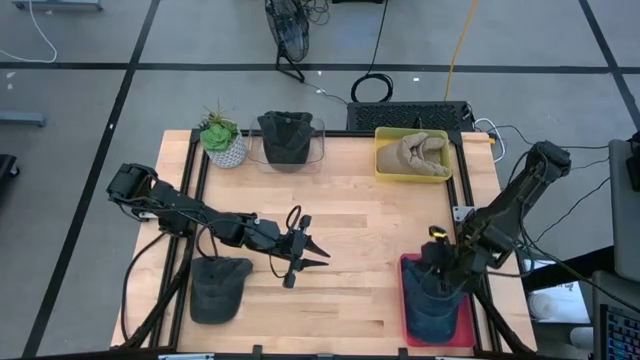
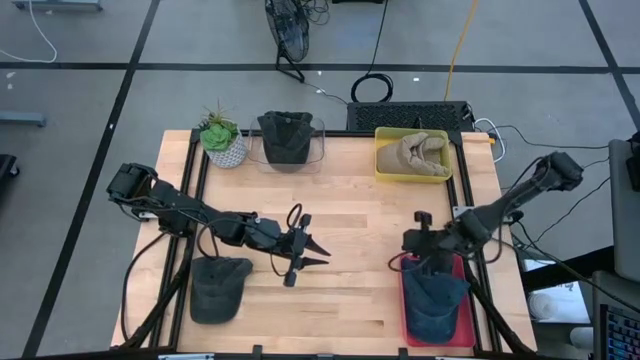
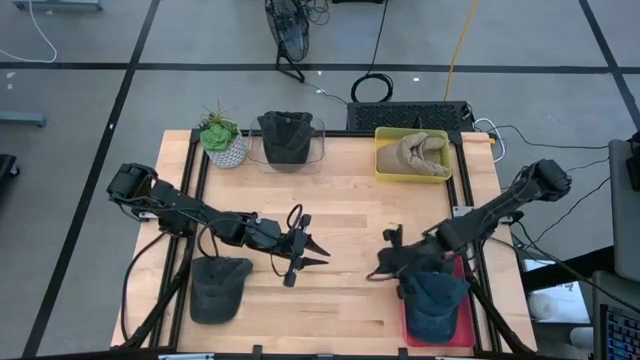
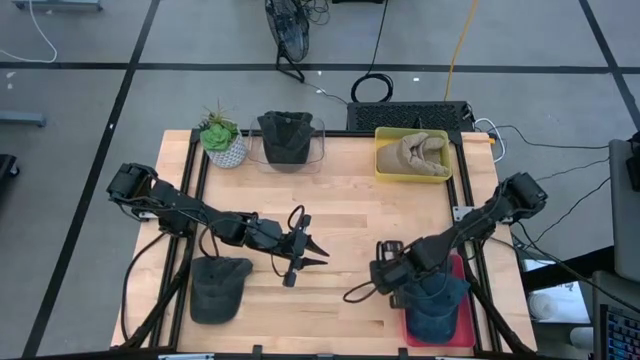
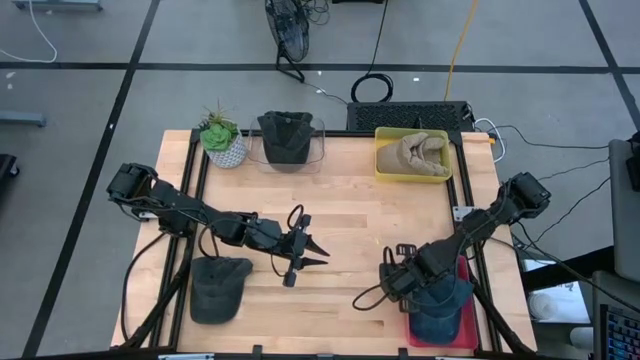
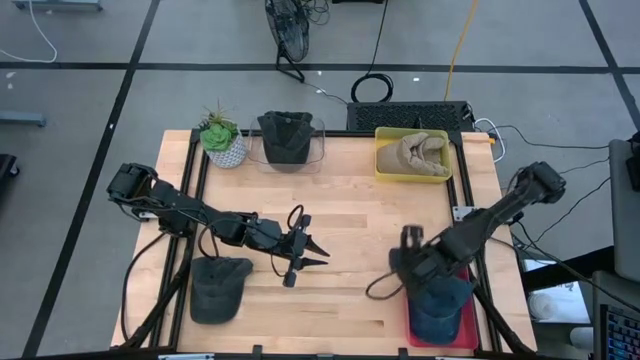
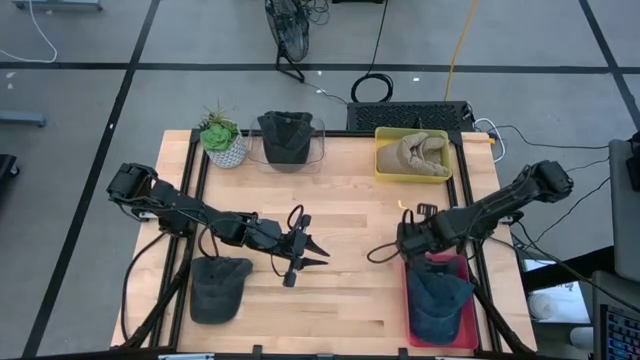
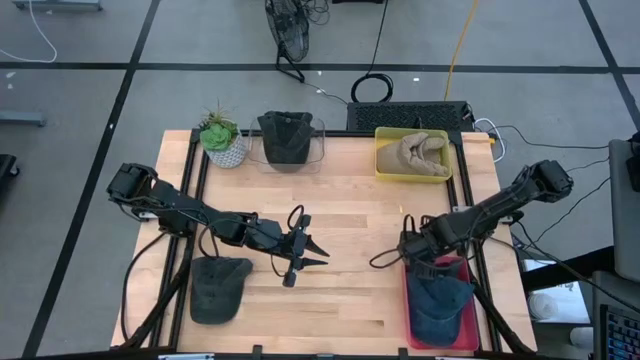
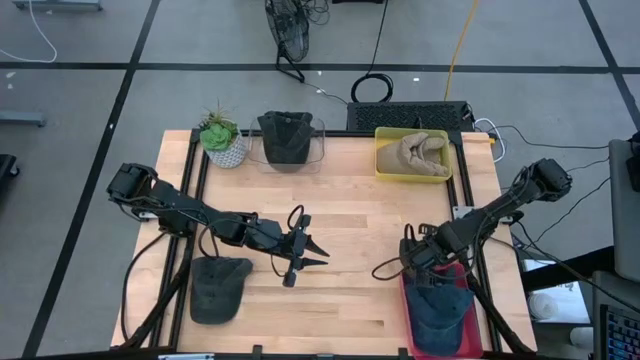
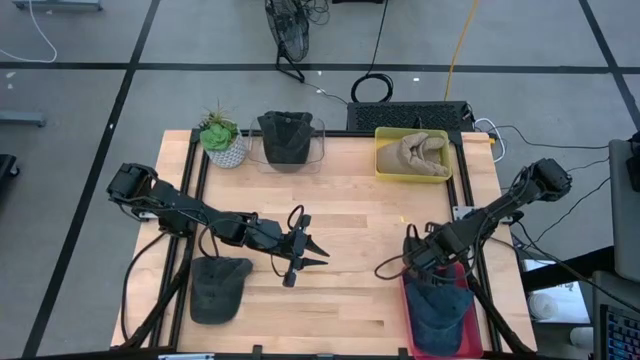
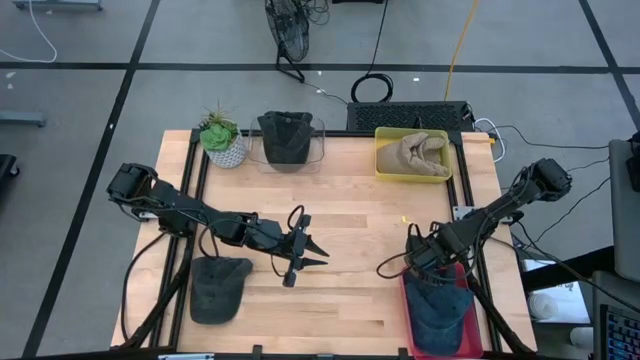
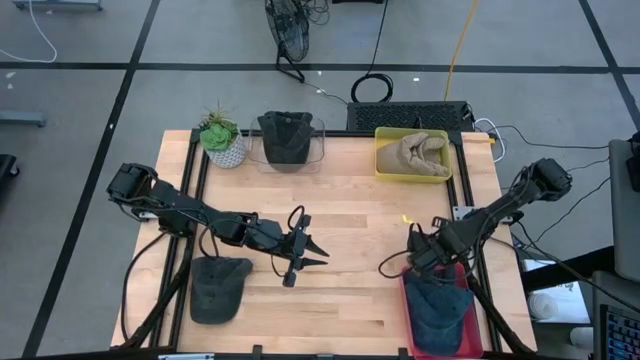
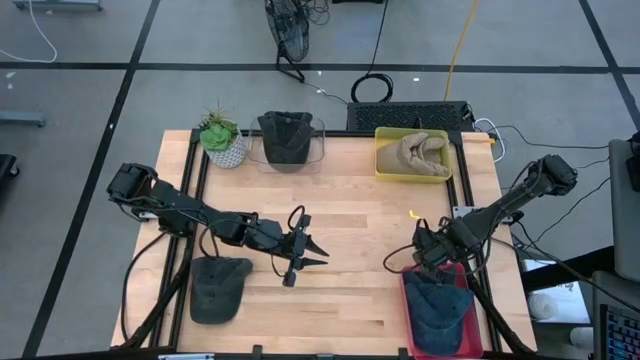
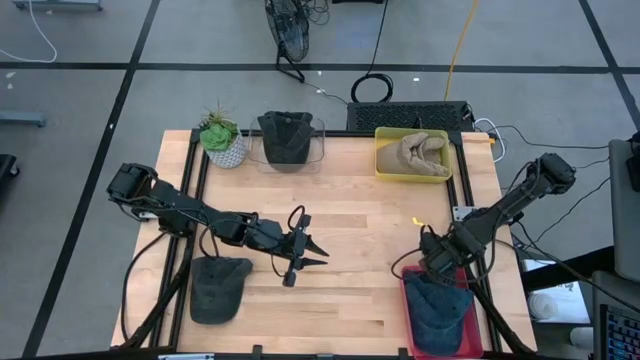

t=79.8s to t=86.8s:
Task: Pick & Place hat
Adjust the pink bin

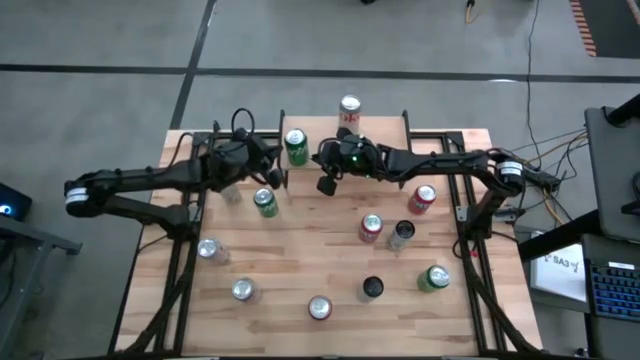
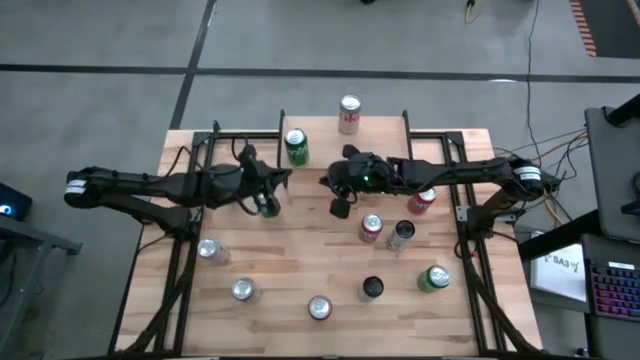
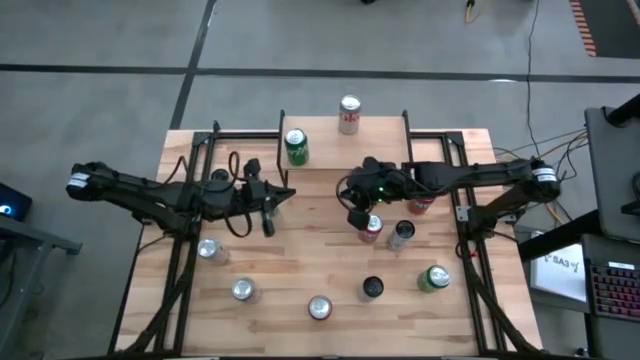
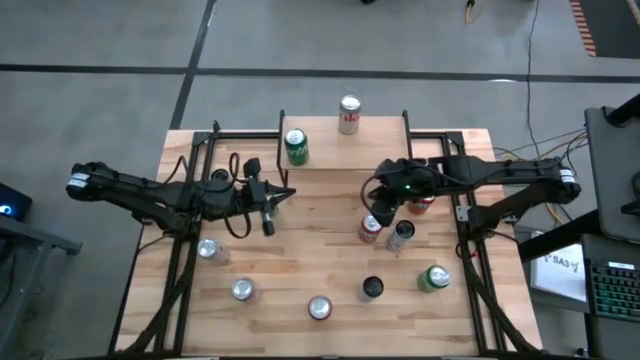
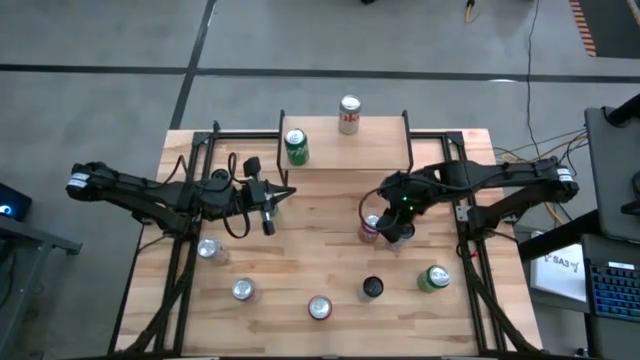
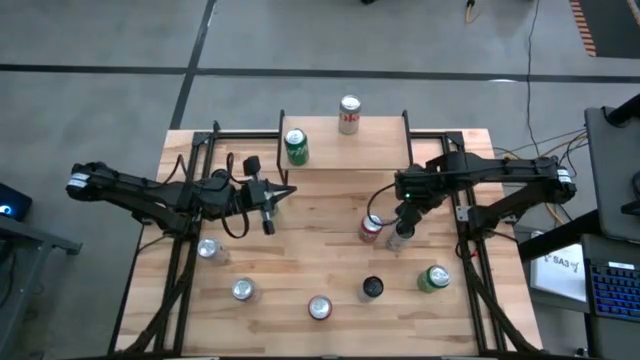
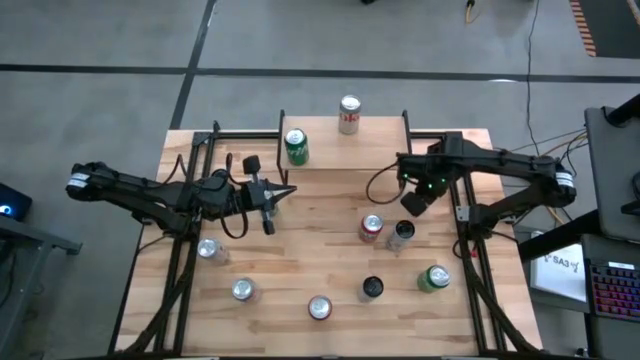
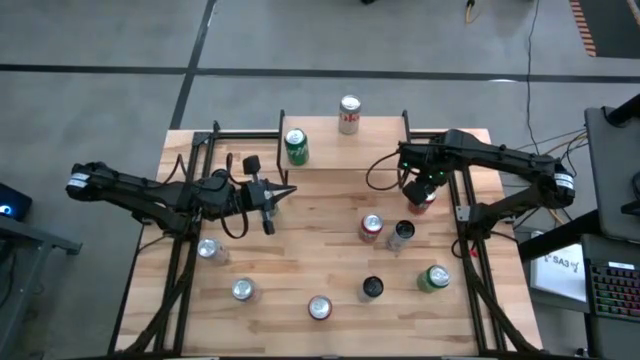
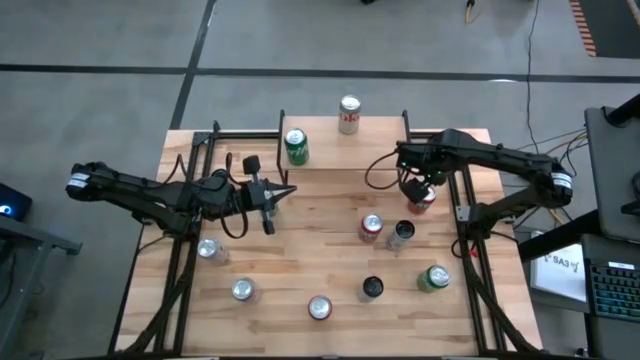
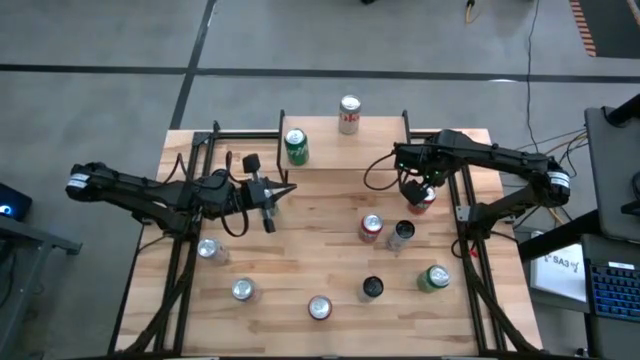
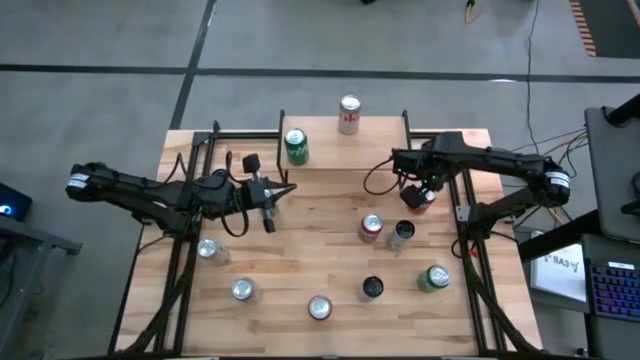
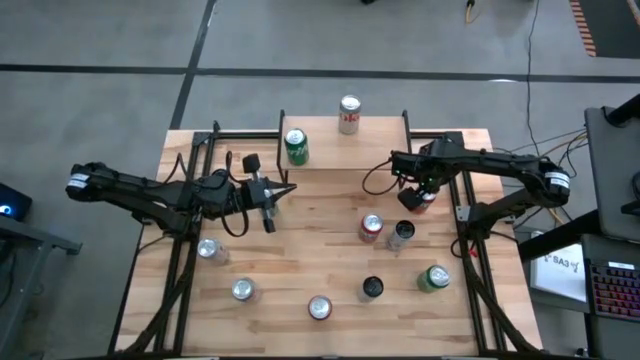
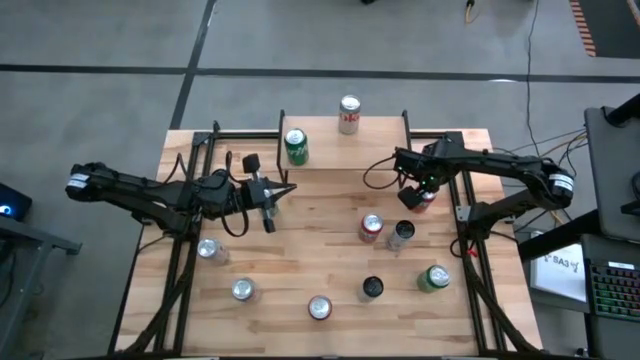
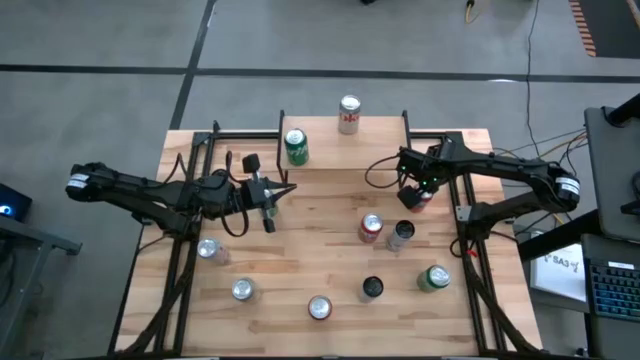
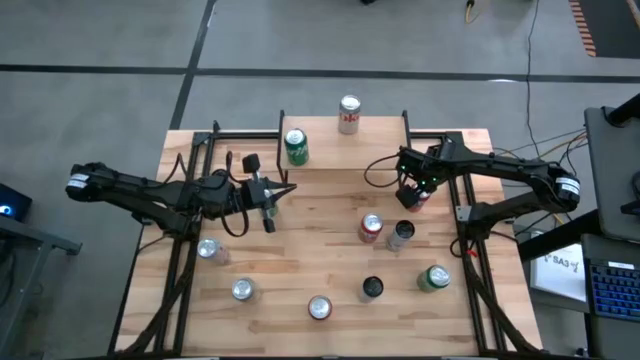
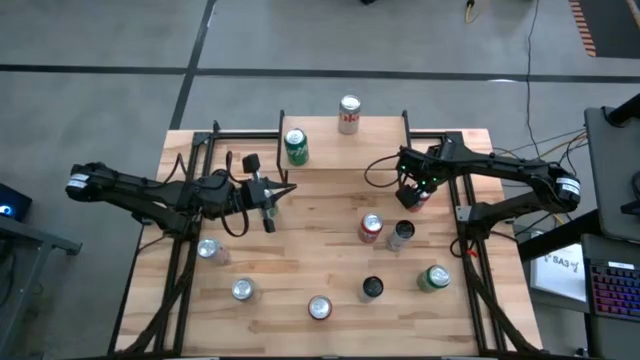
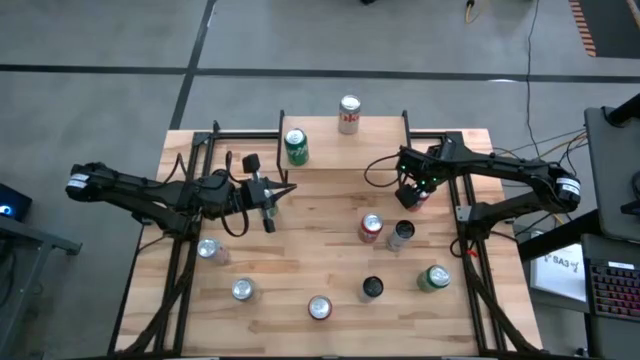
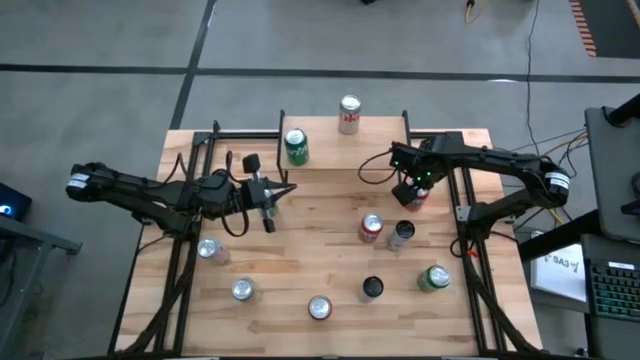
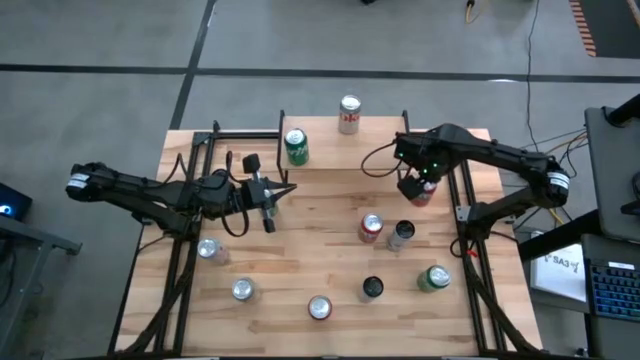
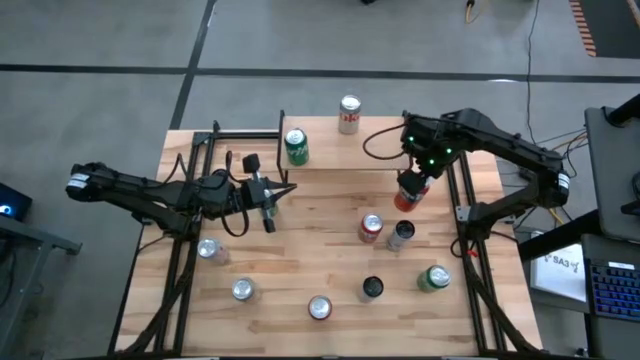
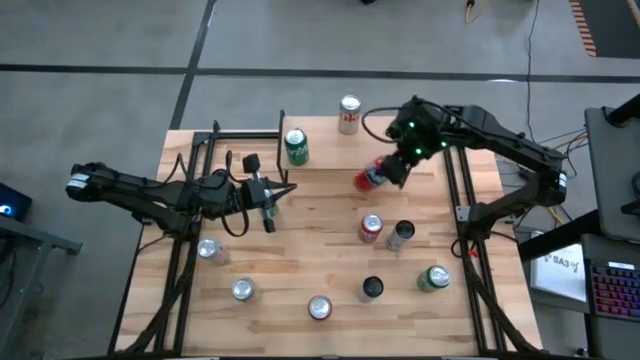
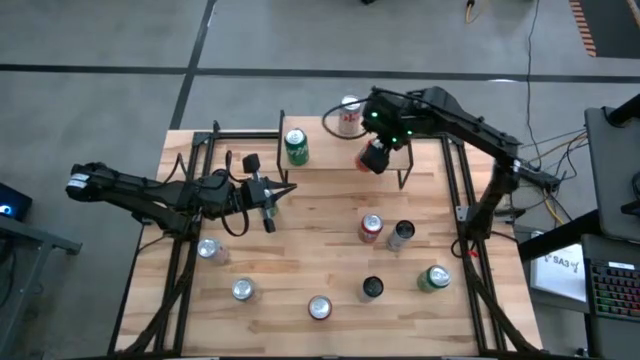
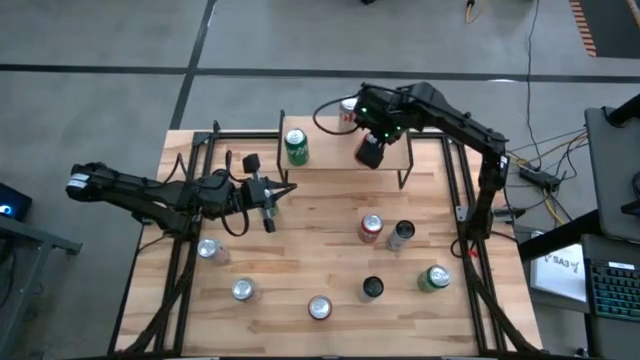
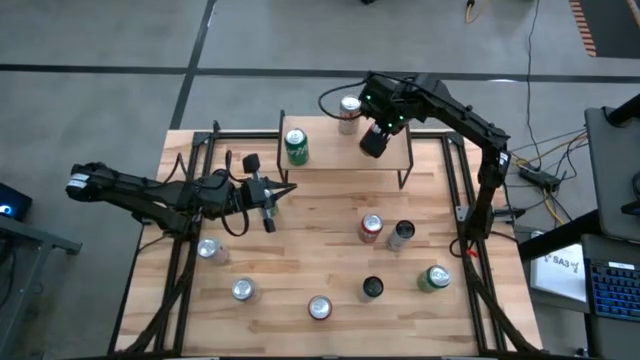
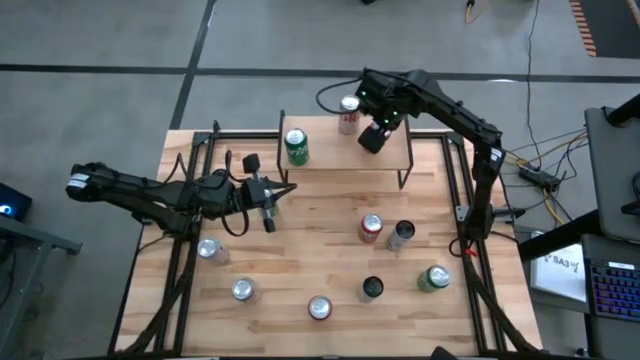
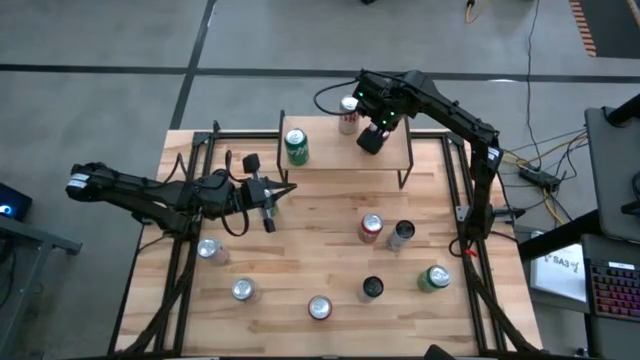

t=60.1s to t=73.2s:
Task: Place canned beverage on shelf
Put the top orange soda can on the shelf
